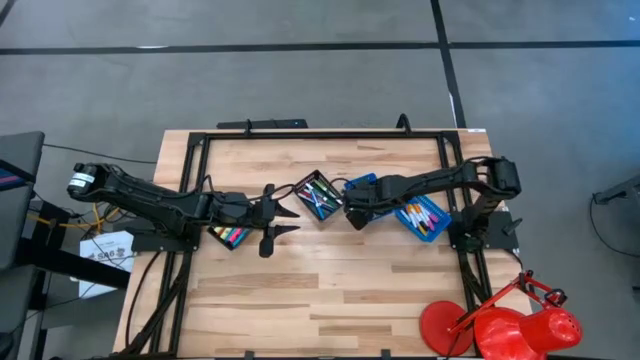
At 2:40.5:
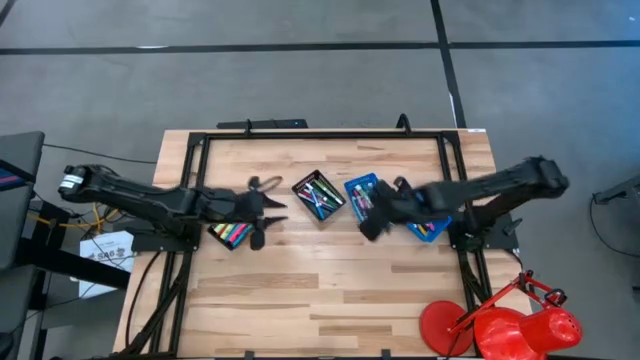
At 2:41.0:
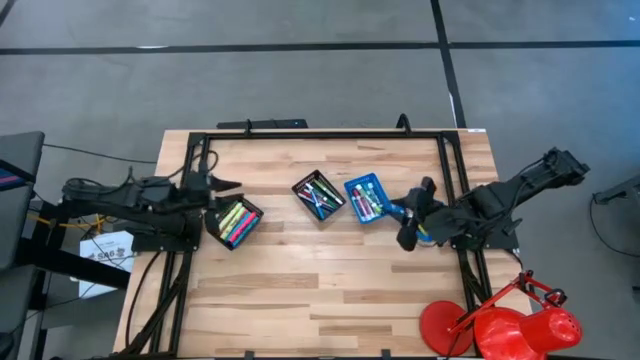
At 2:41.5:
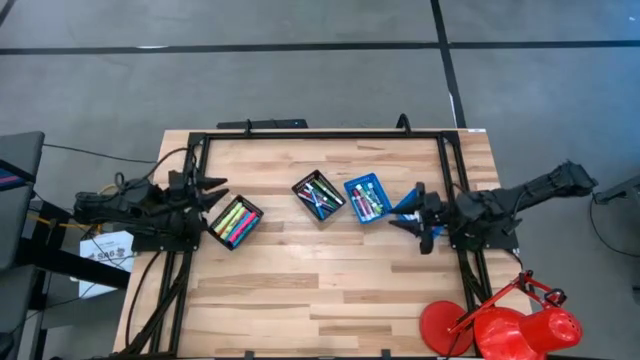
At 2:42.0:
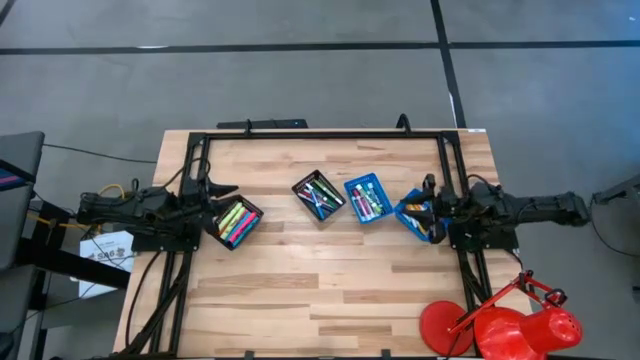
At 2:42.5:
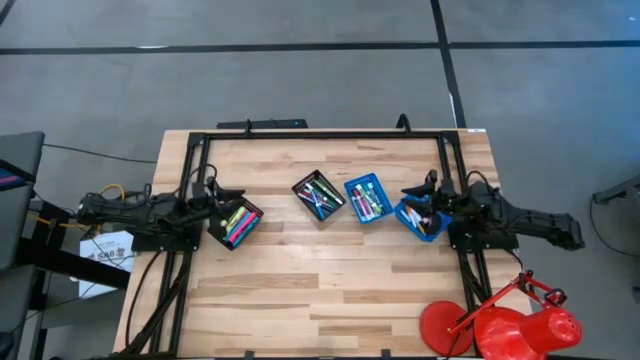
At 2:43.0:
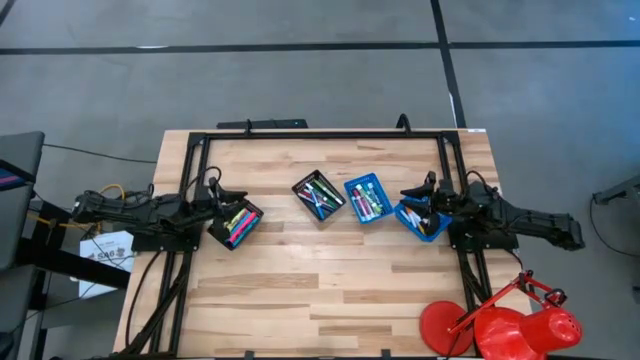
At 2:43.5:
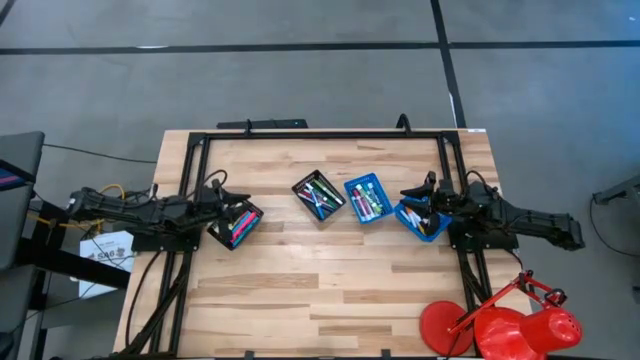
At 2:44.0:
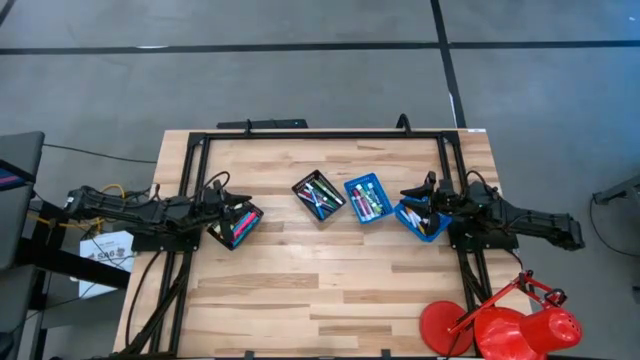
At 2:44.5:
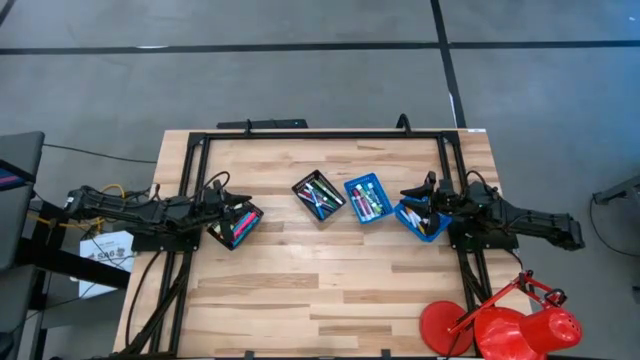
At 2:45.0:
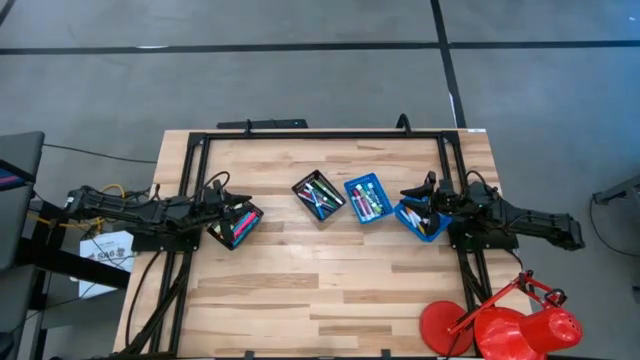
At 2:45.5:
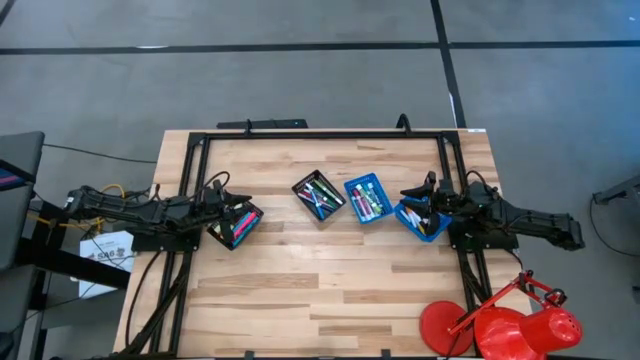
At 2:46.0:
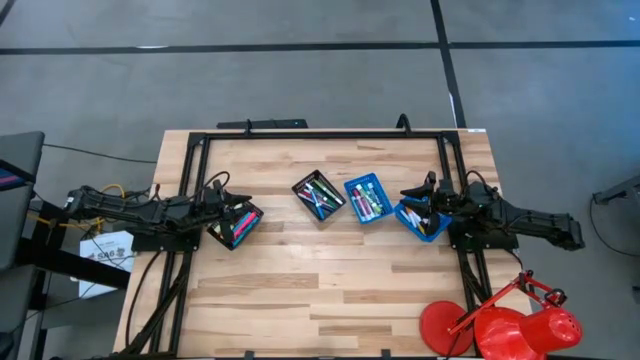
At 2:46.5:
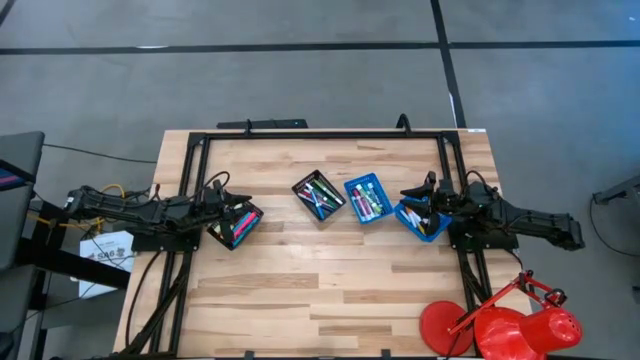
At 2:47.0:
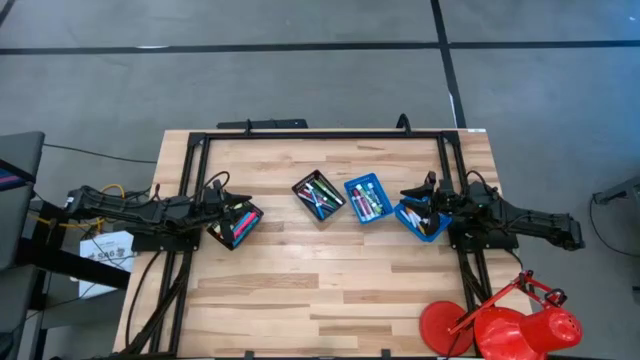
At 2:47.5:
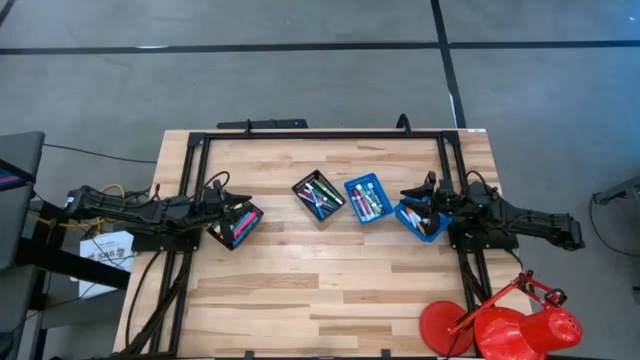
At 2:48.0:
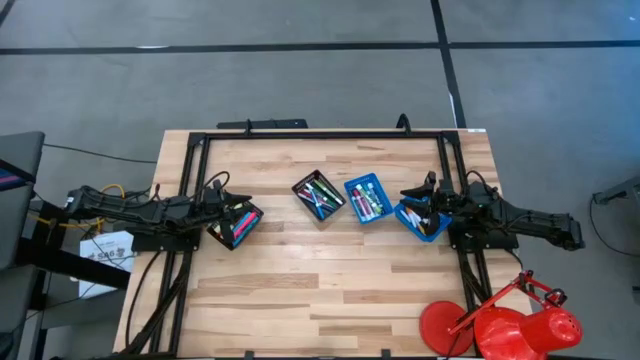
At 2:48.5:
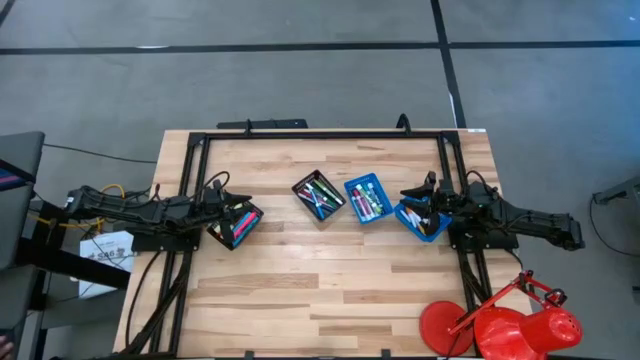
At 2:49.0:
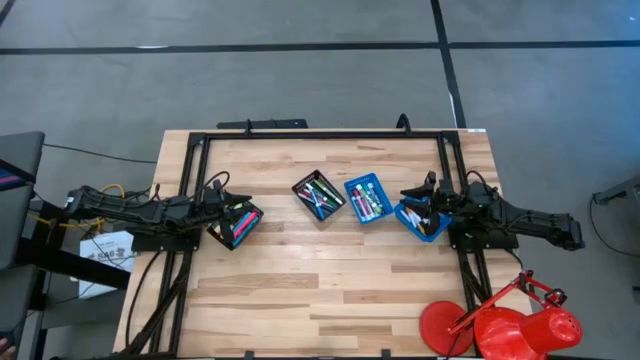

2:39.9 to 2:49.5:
Task: Pick & Place Markers
Return to Home Position

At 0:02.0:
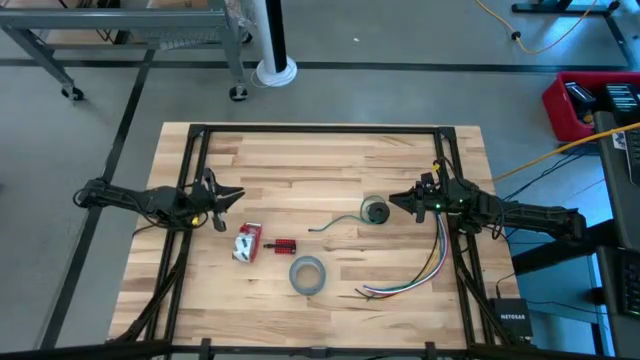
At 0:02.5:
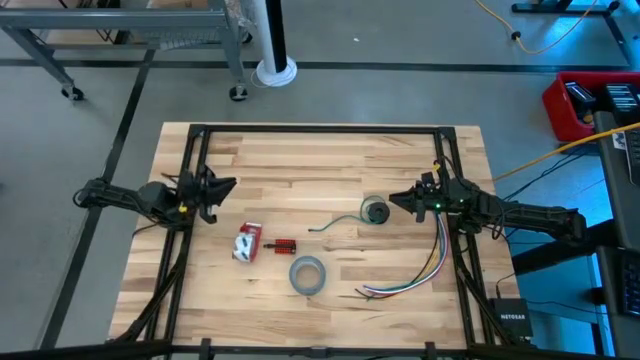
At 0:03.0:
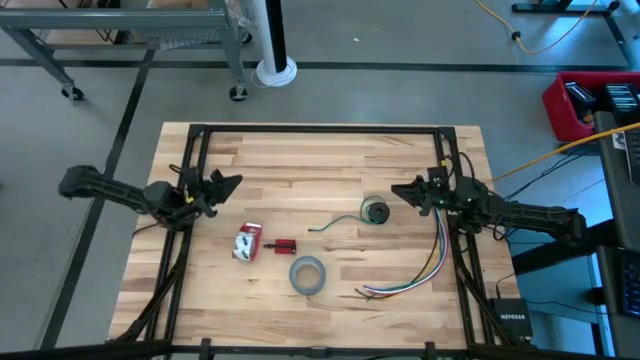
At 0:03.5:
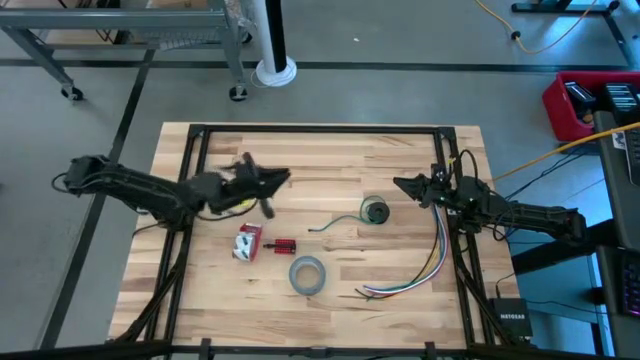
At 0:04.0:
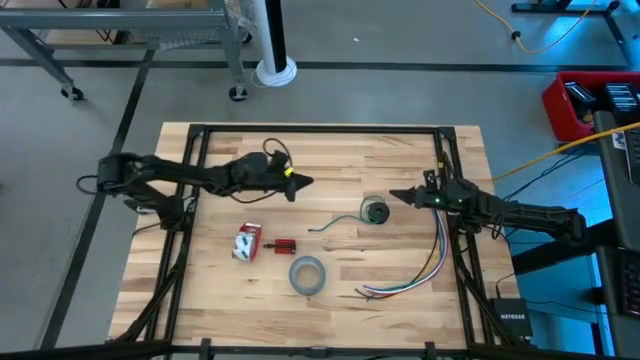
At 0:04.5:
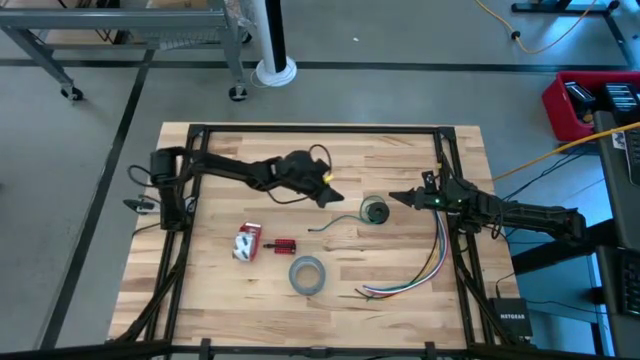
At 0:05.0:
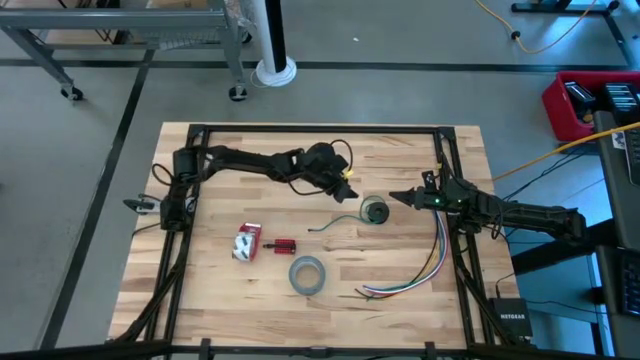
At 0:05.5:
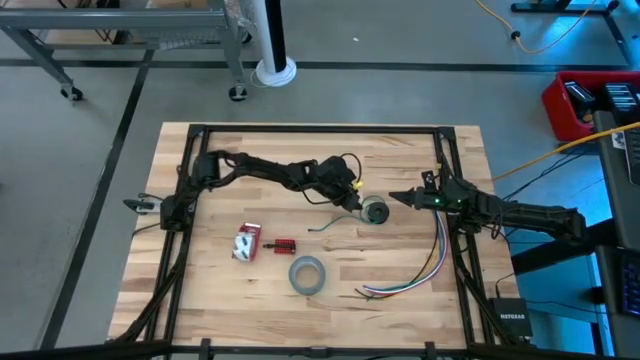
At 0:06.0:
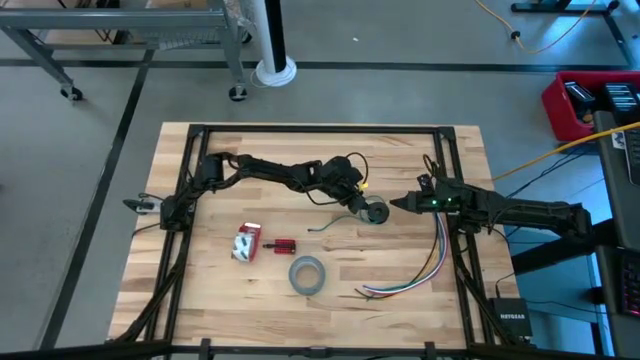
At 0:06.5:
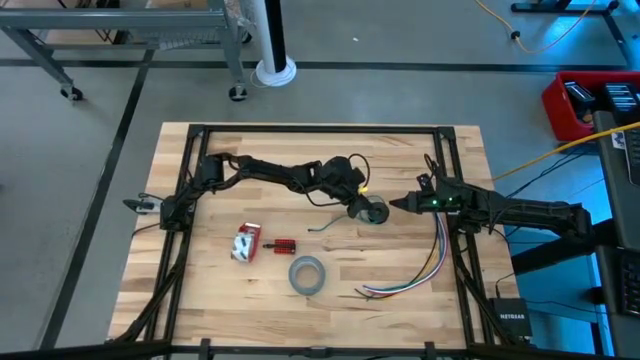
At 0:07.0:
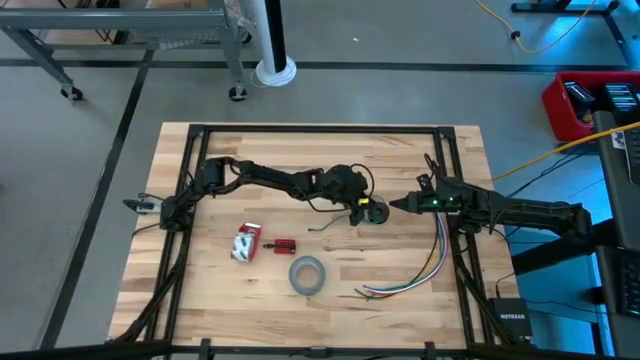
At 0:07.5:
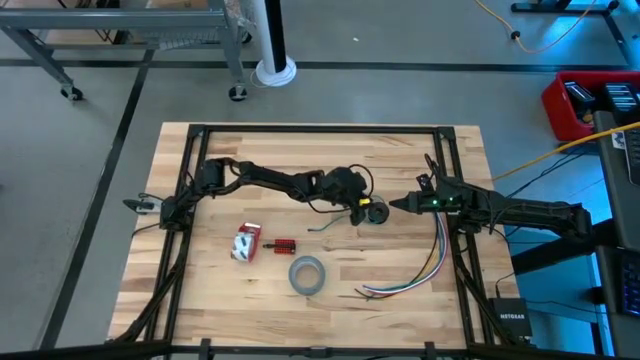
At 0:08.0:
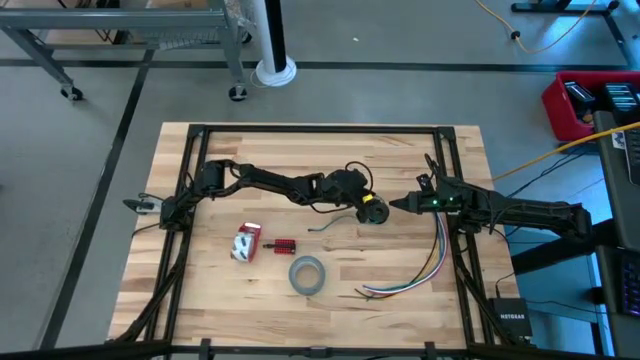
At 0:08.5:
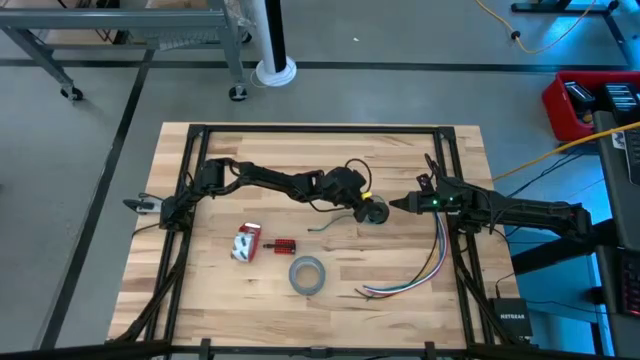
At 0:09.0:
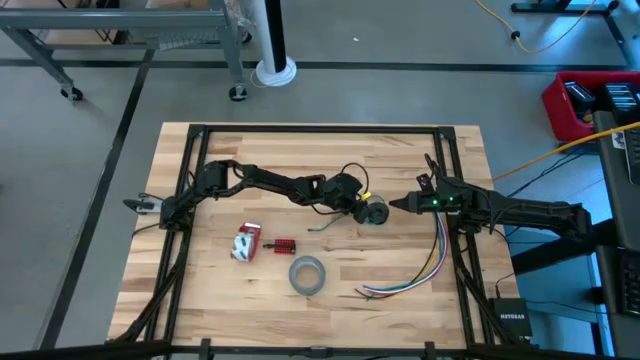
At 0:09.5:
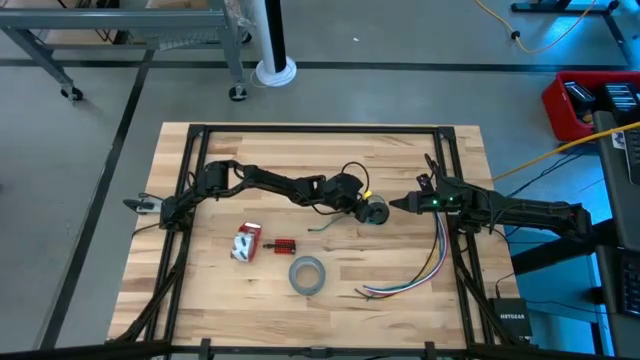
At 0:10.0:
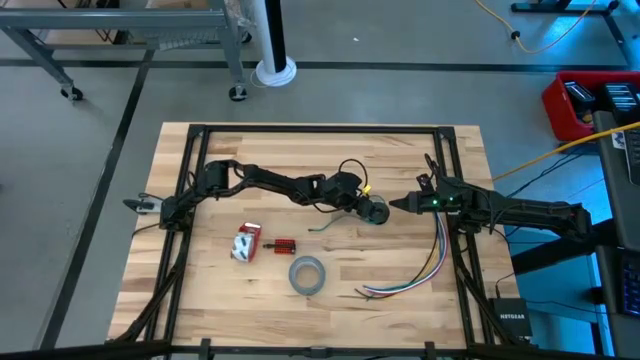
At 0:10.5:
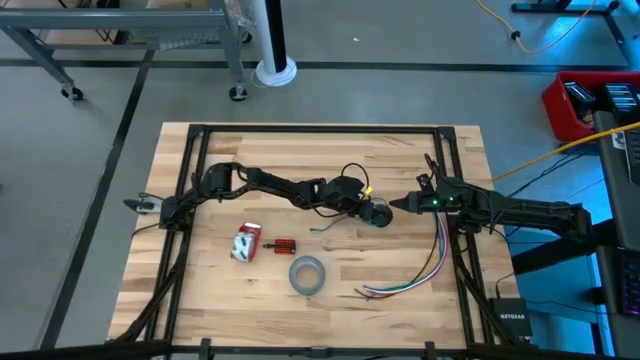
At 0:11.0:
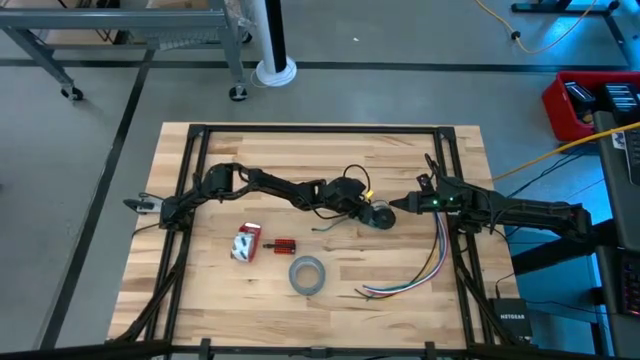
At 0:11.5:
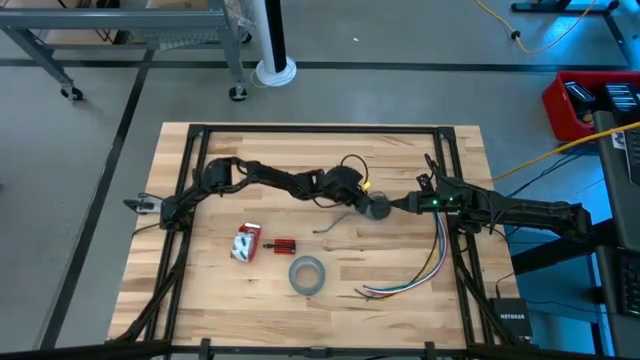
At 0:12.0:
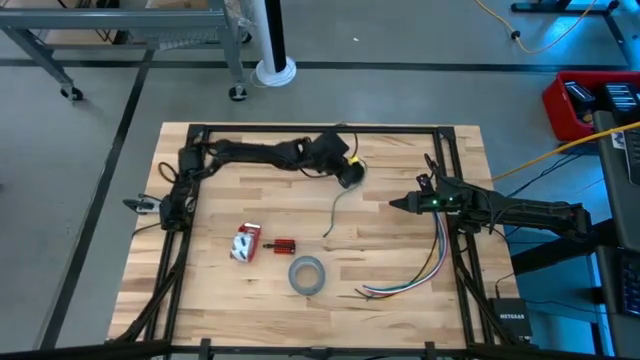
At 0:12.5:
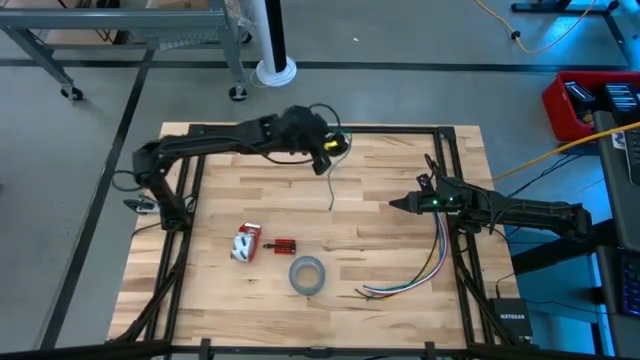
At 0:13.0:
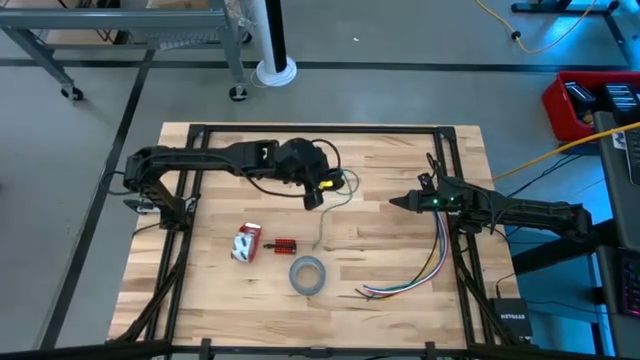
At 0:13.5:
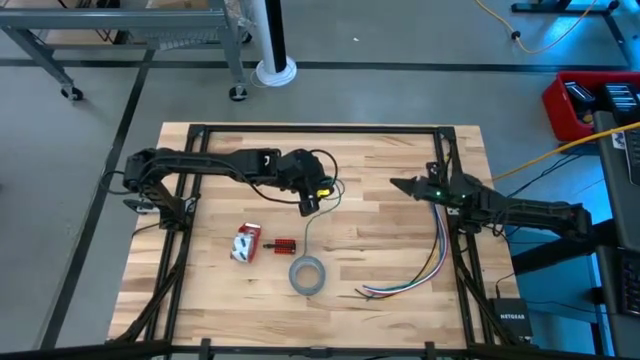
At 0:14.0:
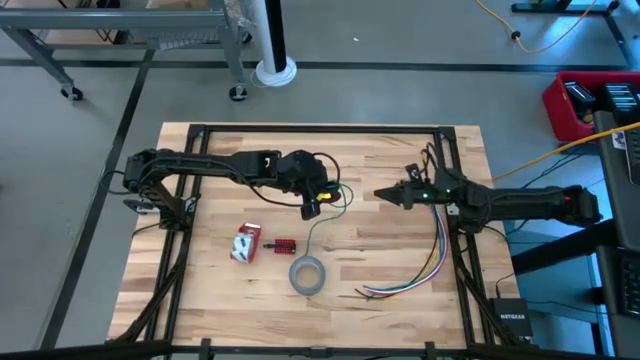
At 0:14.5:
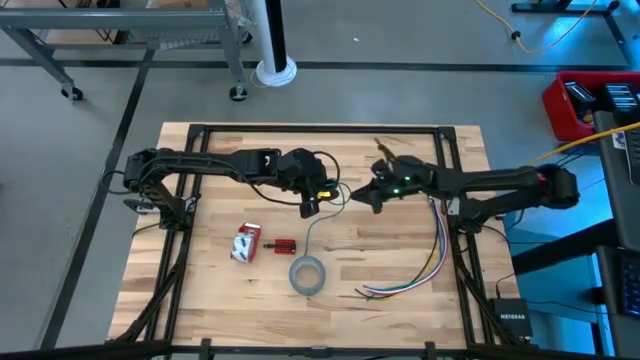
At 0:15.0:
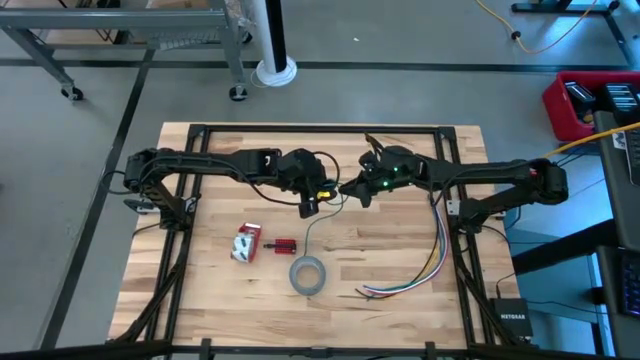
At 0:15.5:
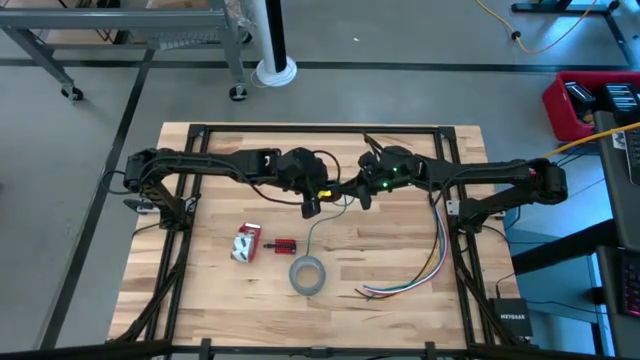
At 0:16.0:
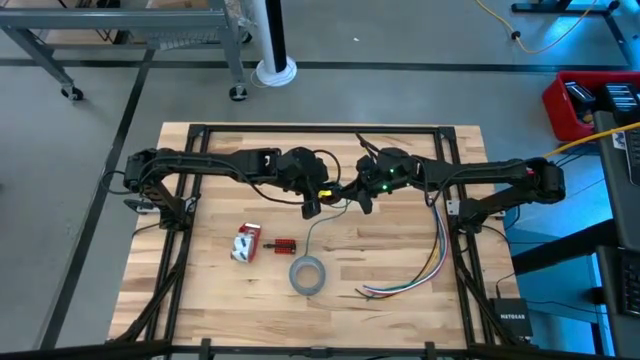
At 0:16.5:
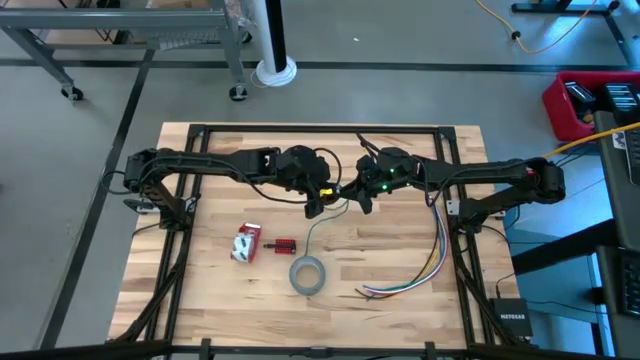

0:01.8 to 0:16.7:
Task: Coil cords
Prepare the spool
